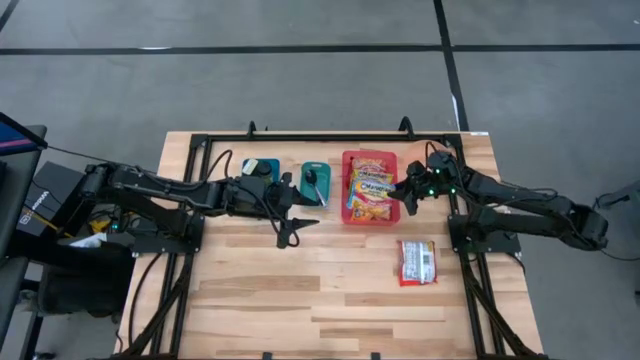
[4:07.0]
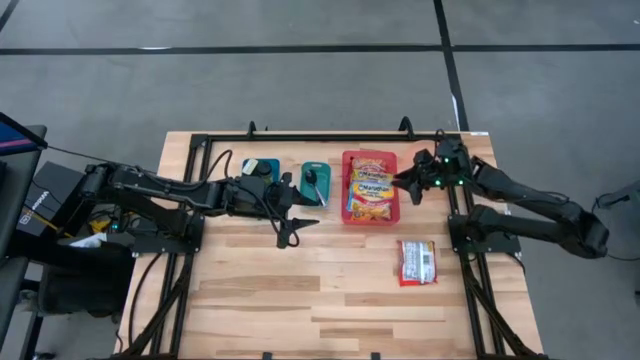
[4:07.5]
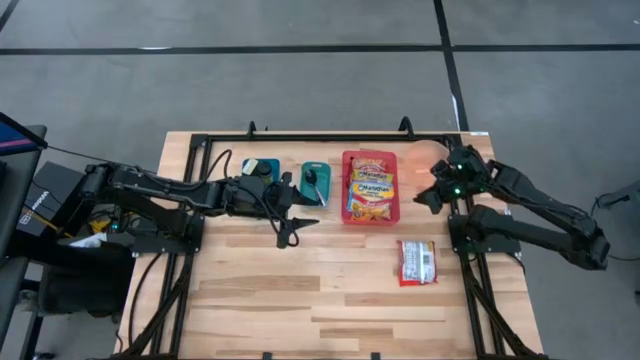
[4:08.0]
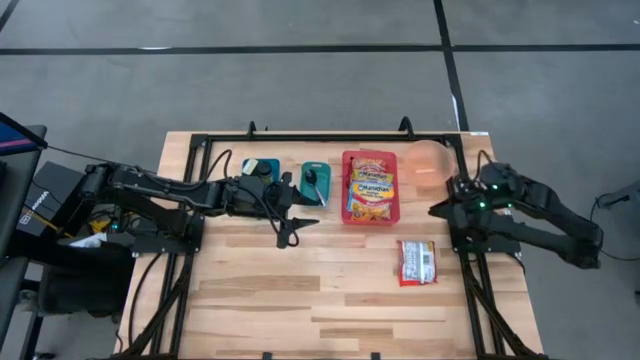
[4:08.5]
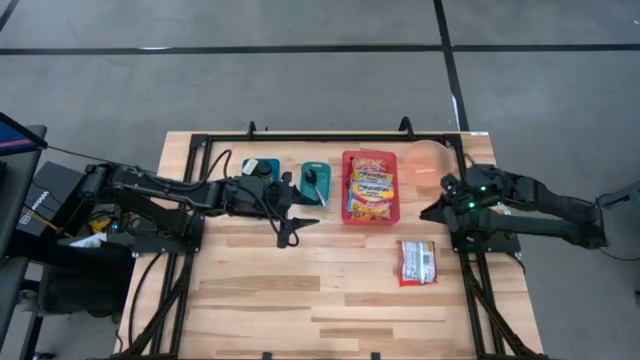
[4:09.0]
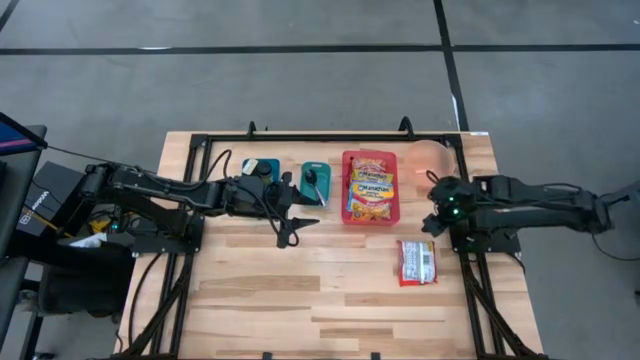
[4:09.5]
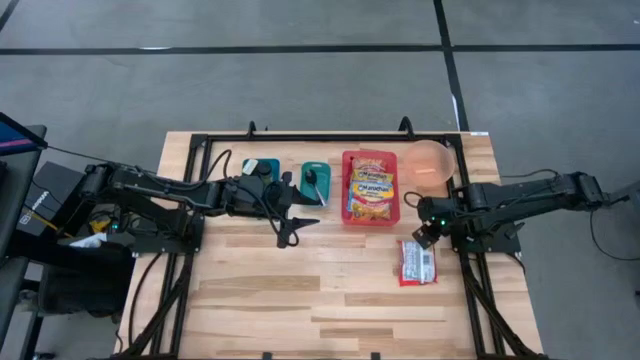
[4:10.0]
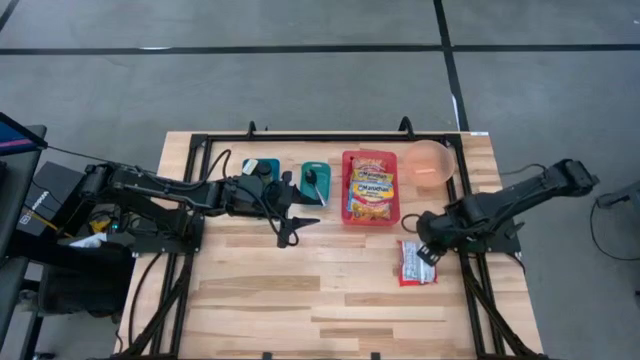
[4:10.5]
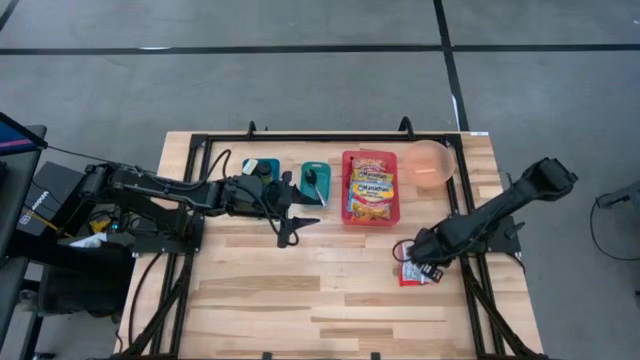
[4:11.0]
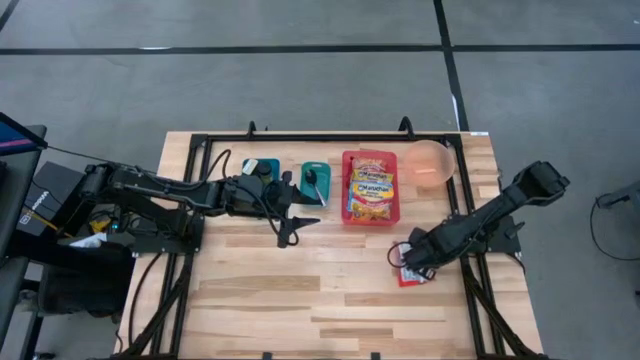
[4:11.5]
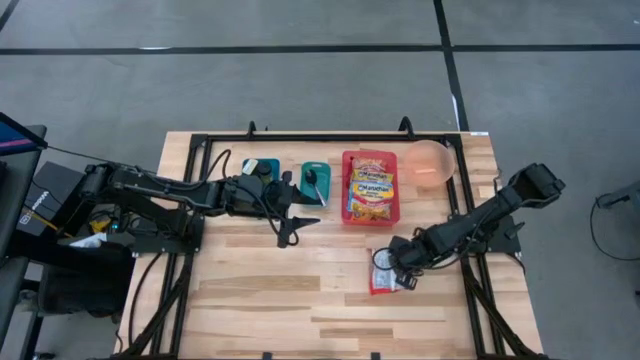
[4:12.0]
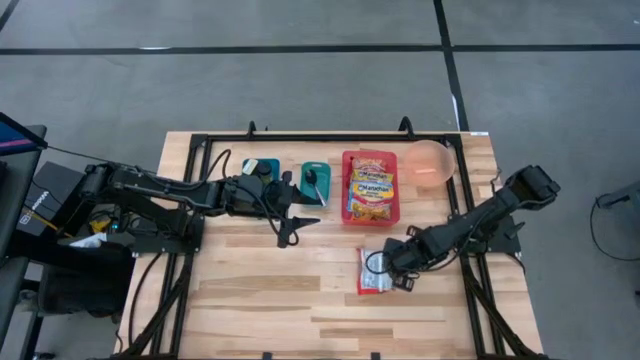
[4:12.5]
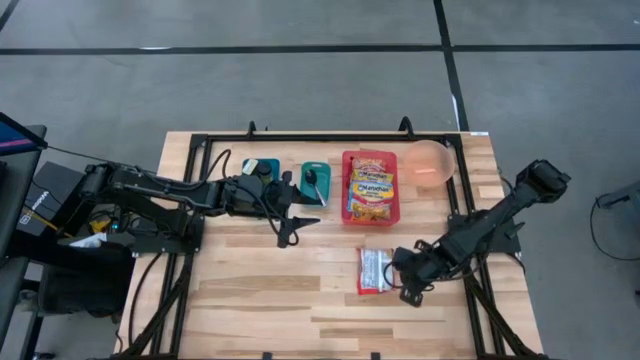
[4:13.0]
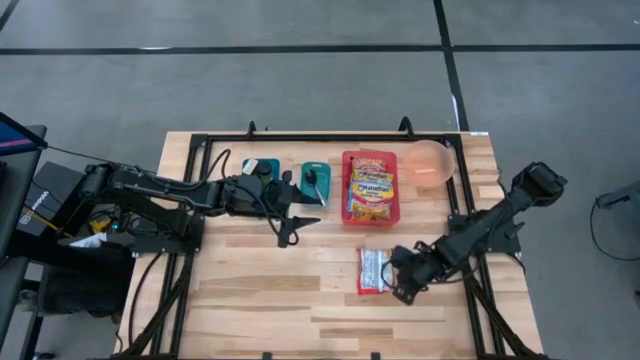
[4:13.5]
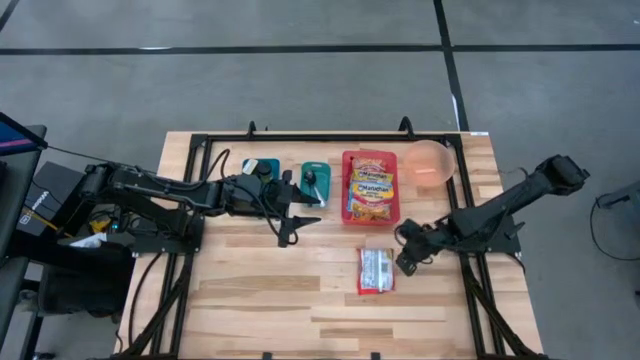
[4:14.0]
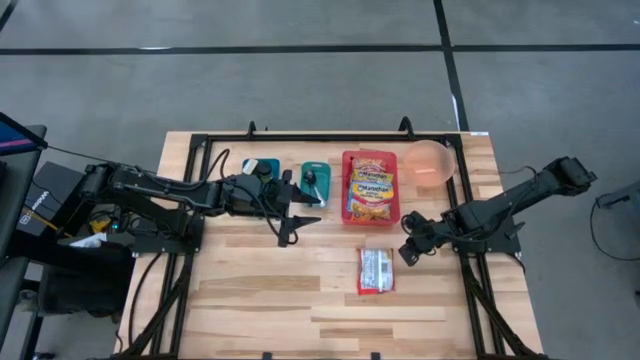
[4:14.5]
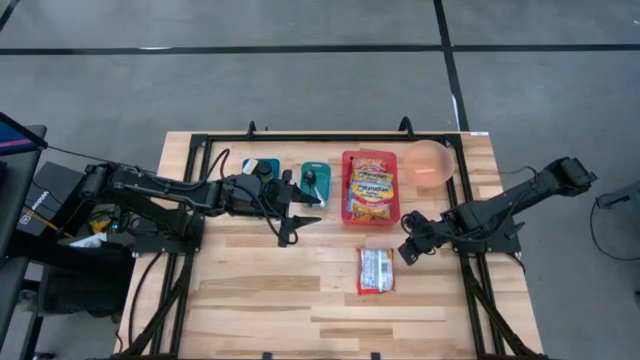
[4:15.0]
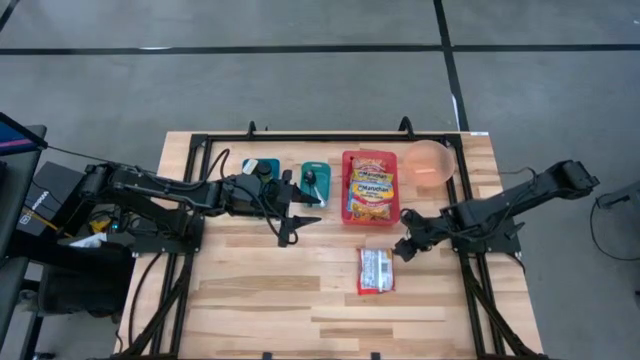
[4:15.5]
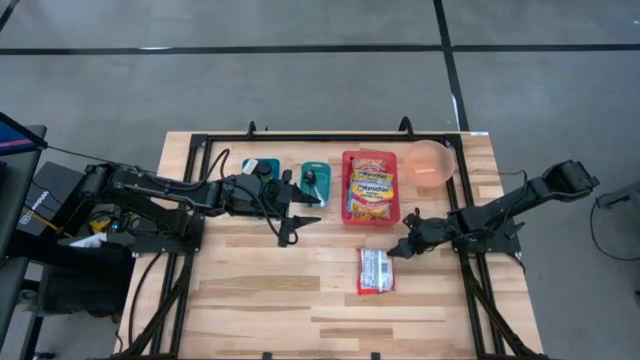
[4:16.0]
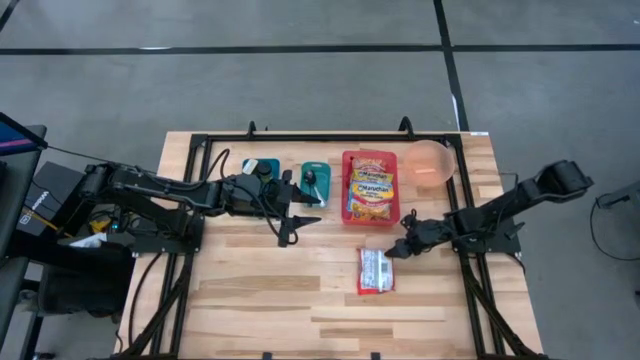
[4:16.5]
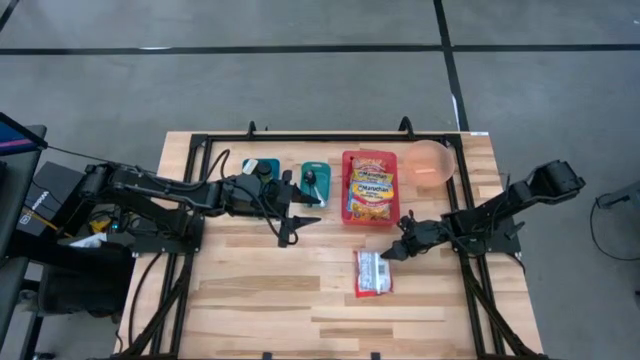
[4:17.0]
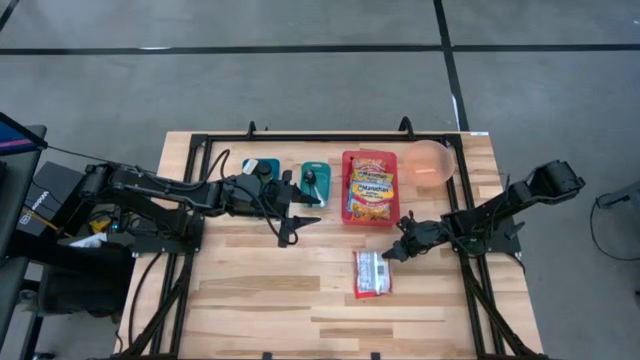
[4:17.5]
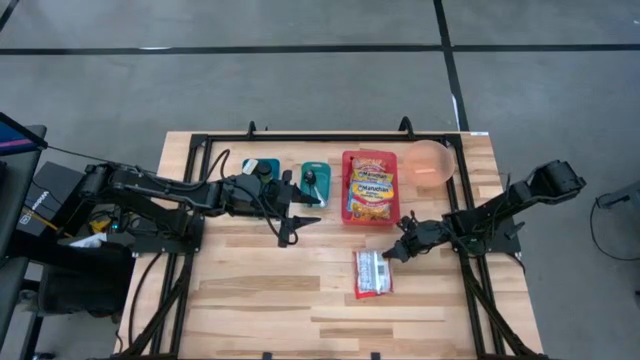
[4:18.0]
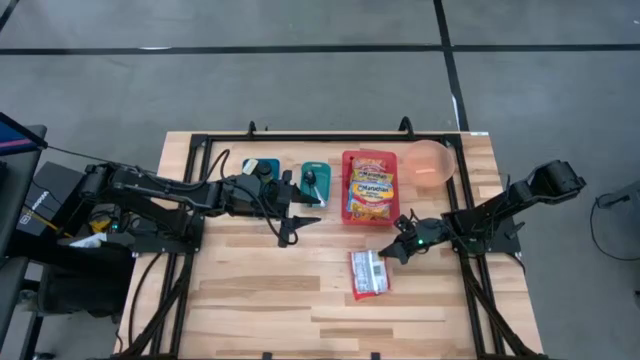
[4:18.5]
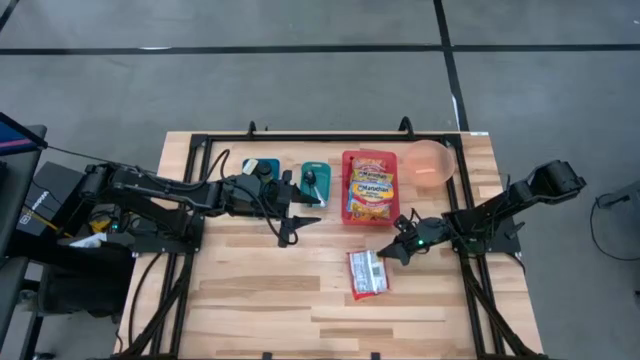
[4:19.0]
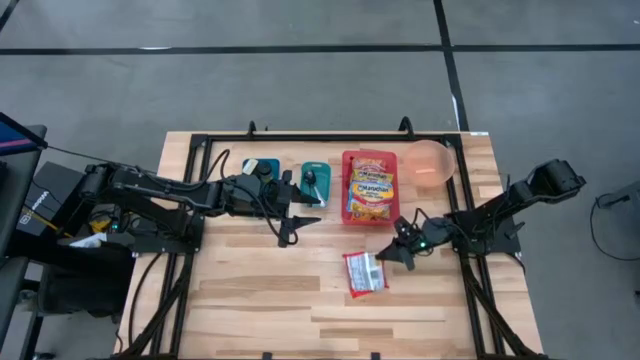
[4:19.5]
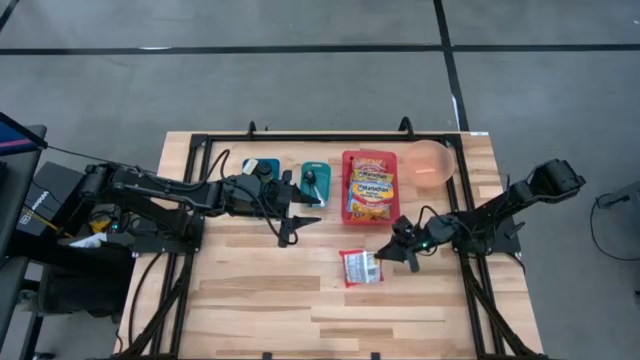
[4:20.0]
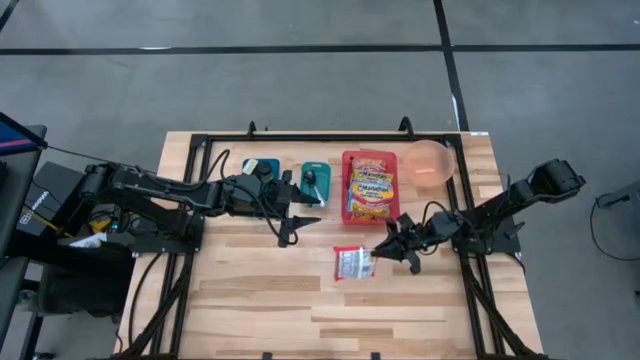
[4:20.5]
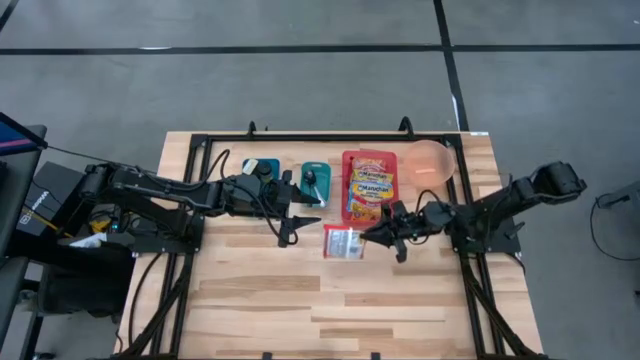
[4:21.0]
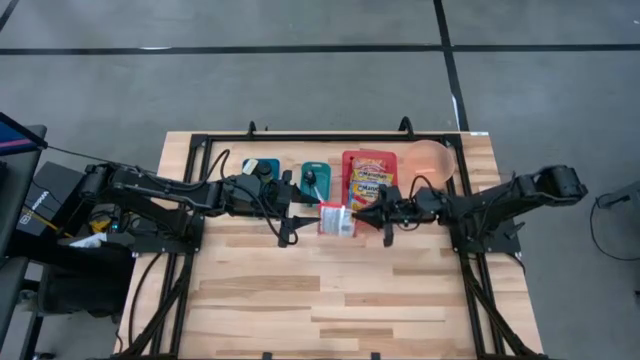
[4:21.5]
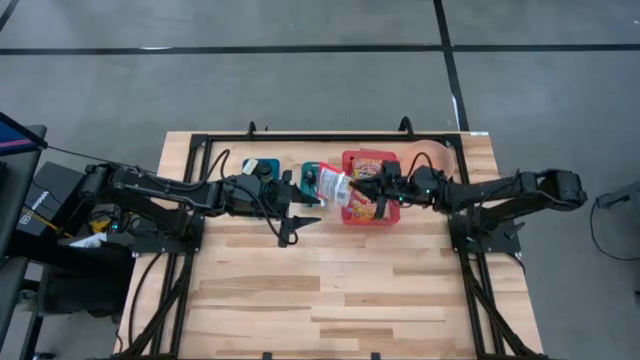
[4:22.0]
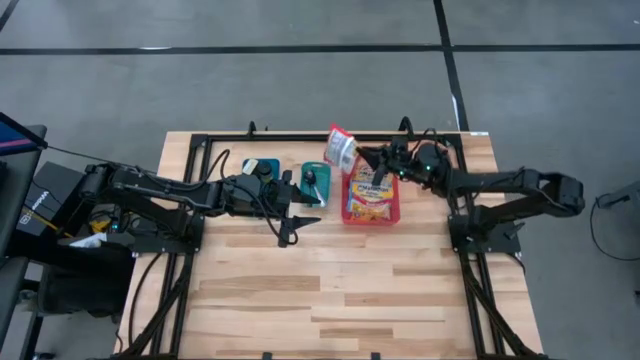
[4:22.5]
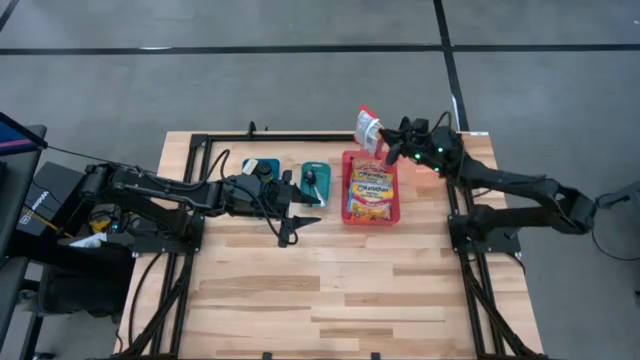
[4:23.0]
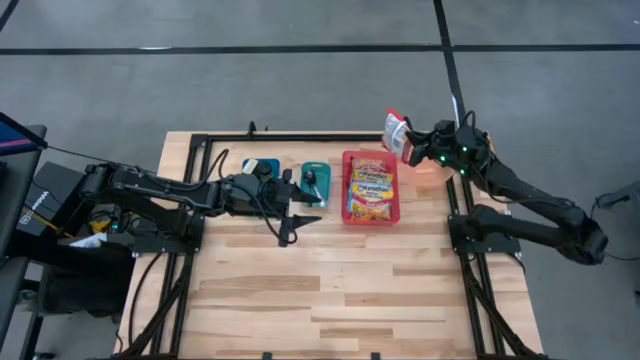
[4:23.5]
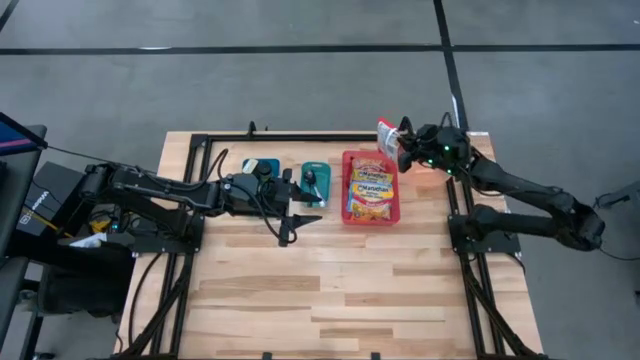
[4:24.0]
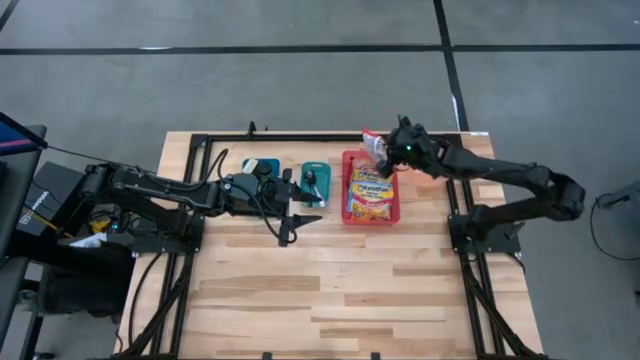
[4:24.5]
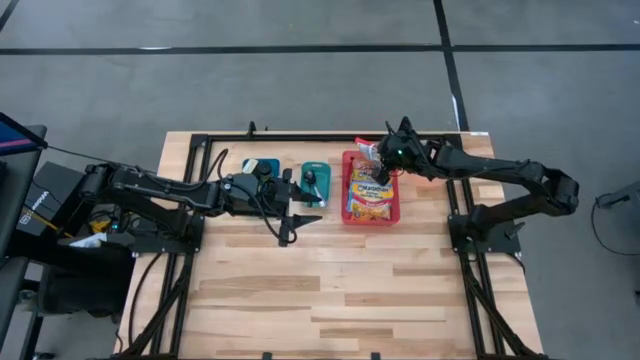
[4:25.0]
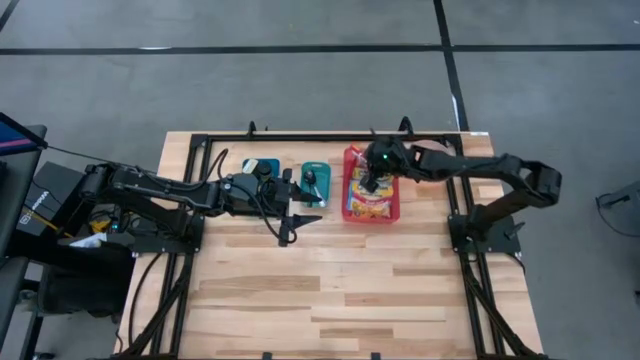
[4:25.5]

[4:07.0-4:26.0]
Task: Pick & Place Food Item
Put the orange noodle pack into the red bin
